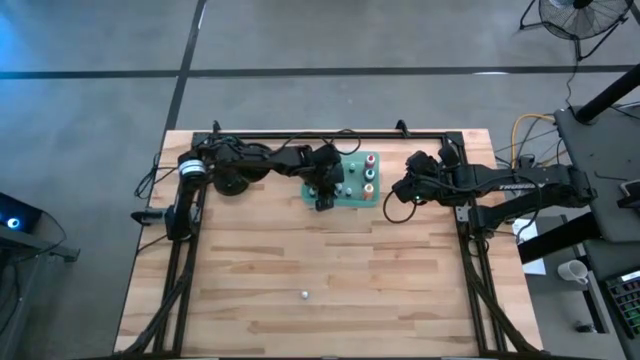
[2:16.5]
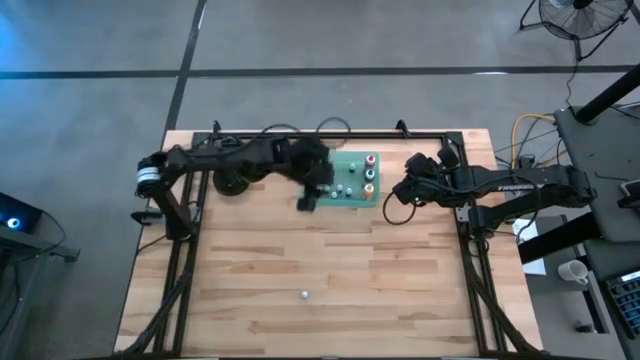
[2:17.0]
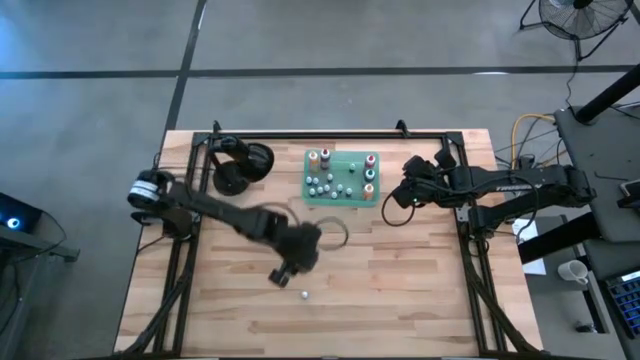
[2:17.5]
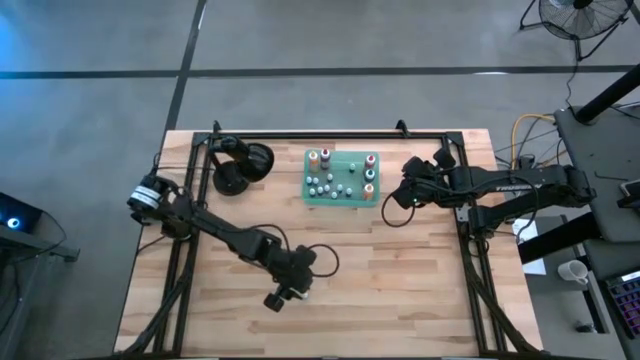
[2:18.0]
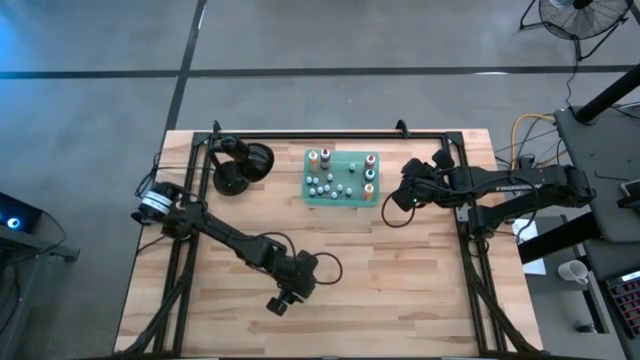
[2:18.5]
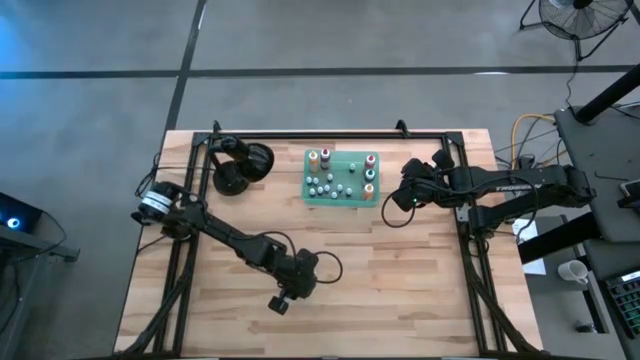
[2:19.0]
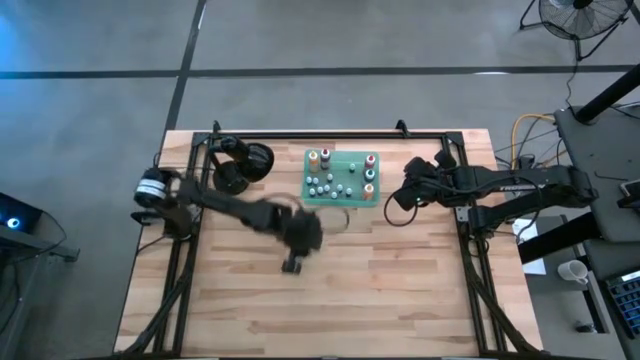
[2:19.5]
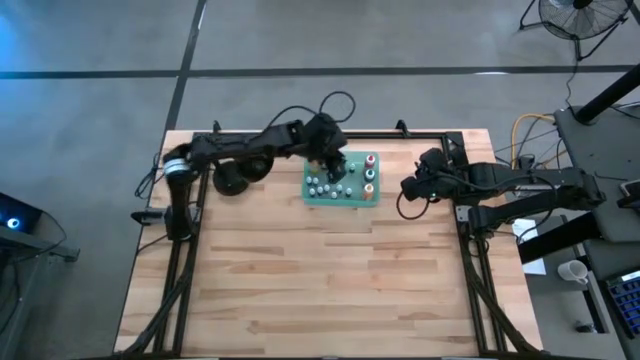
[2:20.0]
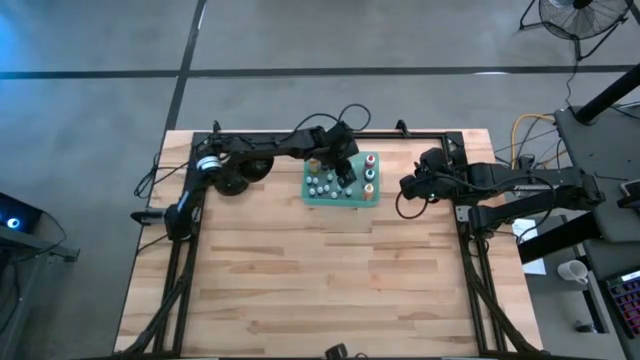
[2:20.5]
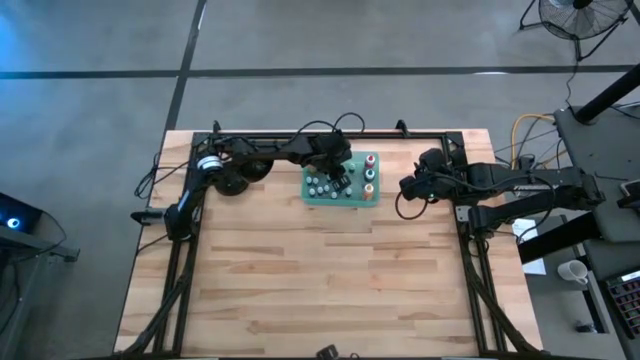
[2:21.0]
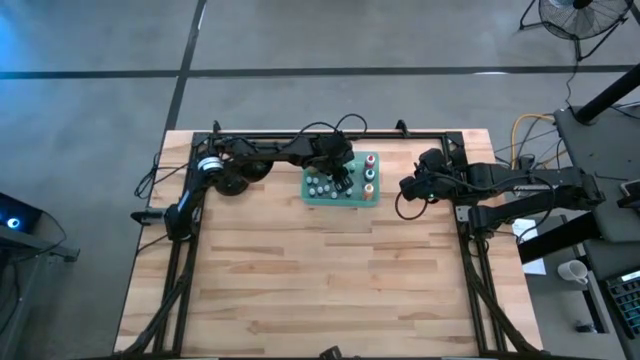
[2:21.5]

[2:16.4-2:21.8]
Task: Pick & Place food coloring
Put the small green food coloring bottle into the green bin

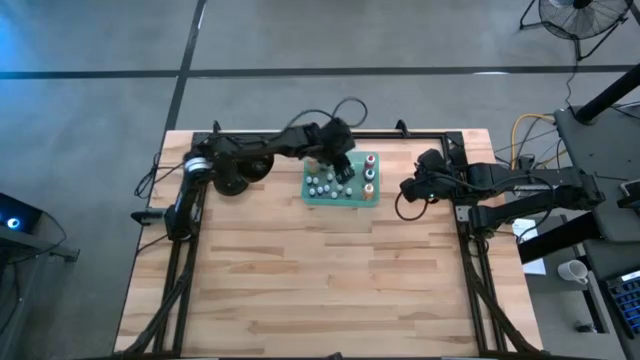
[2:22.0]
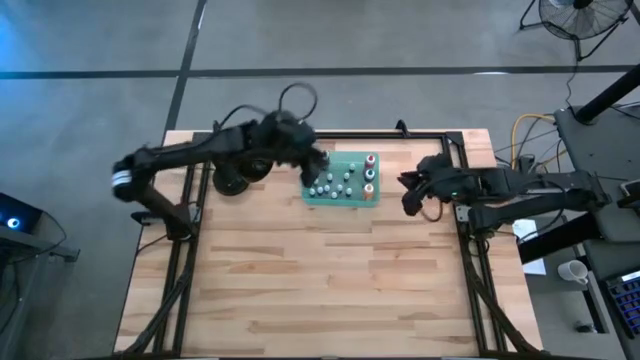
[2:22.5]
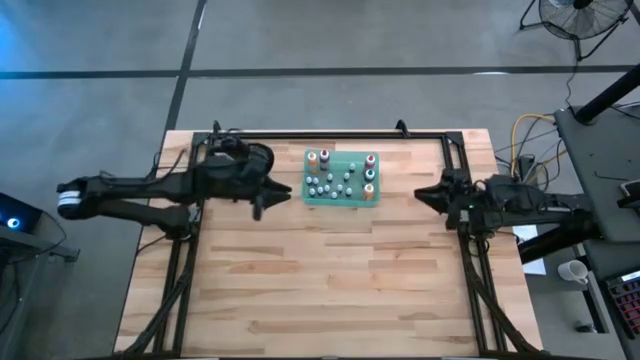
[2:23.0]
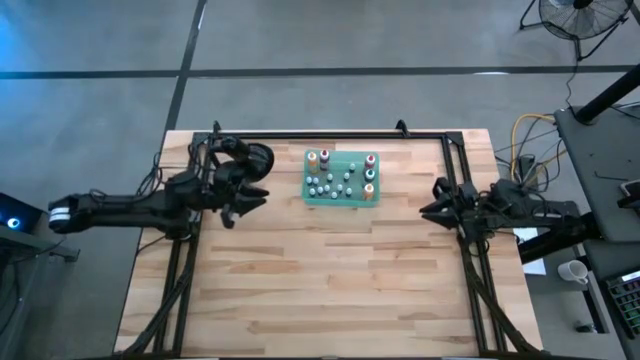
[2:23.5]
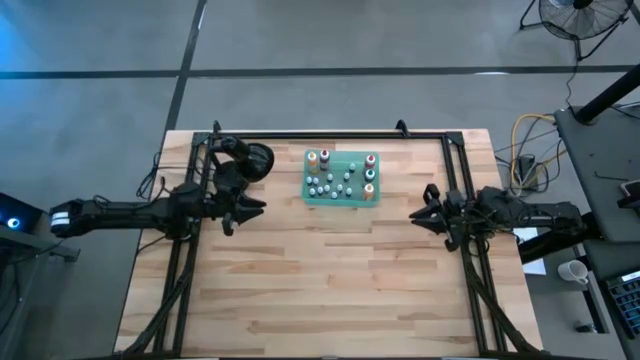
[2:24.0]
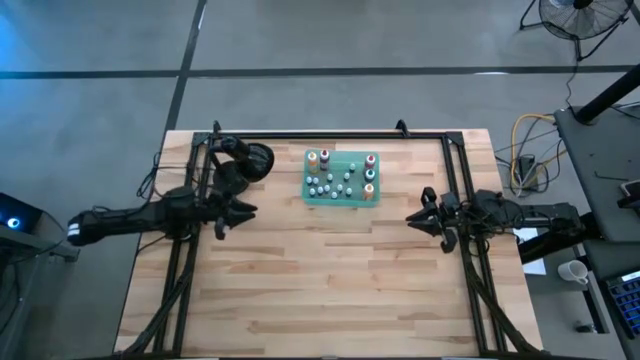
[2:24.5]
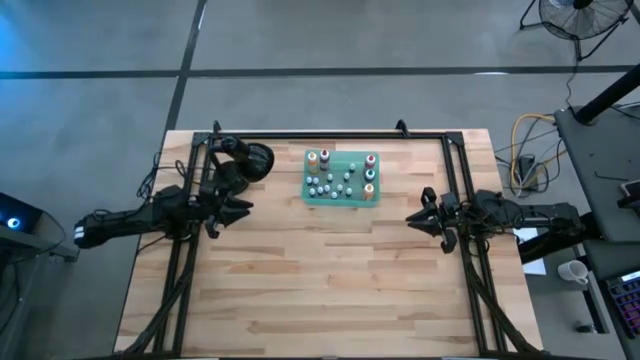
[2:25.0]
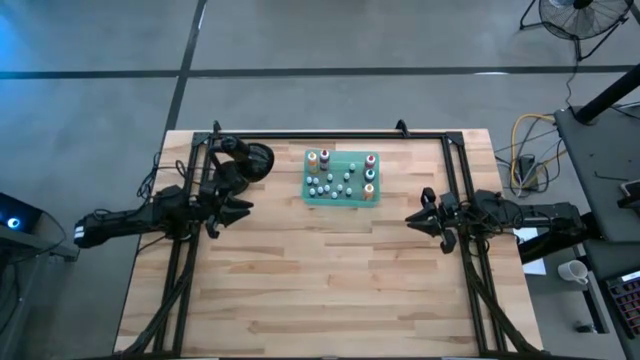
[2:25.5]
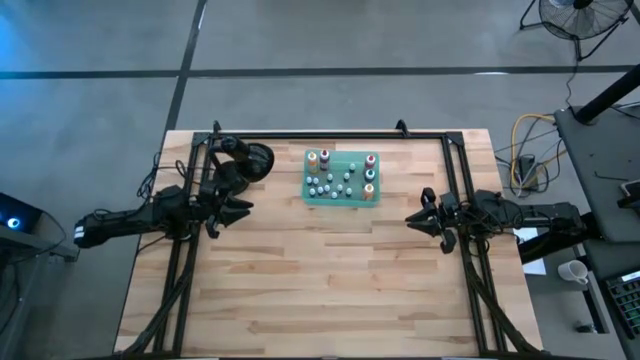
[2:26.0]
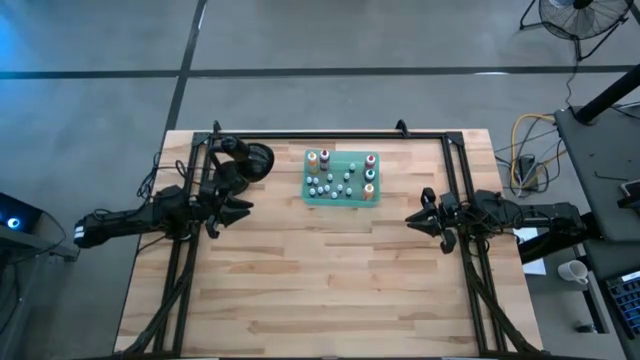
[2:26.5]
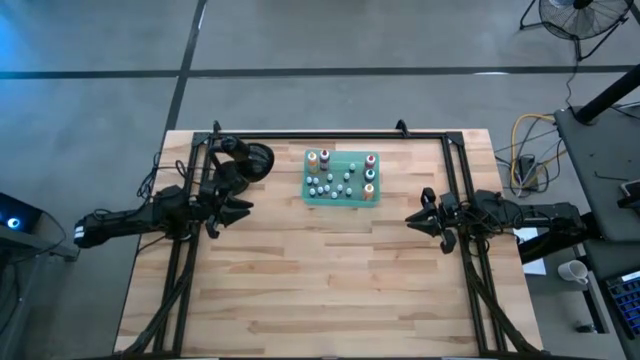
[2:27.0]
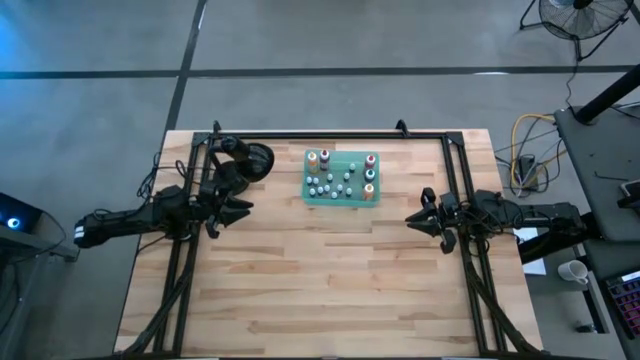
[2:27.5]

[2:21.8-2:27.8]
Return to Home Position

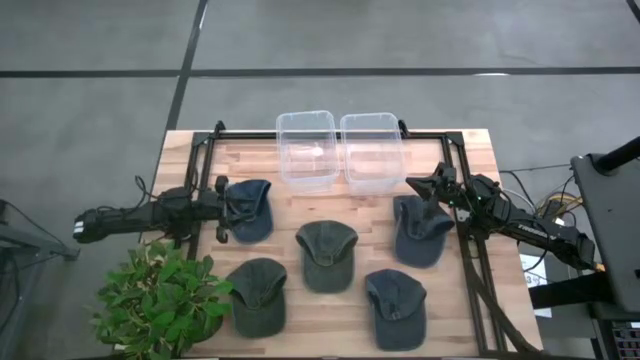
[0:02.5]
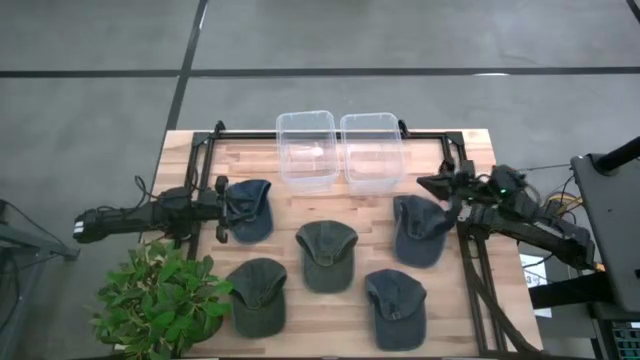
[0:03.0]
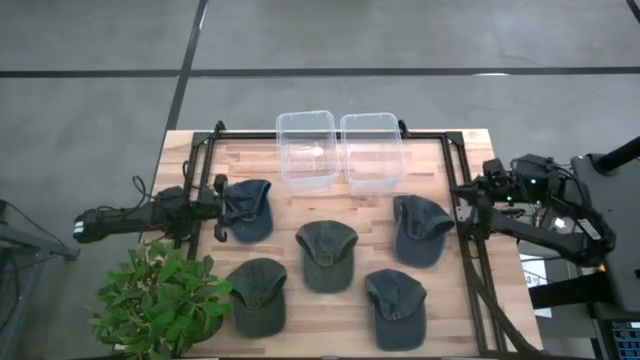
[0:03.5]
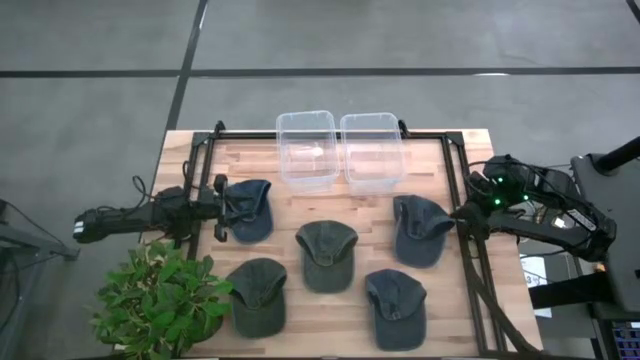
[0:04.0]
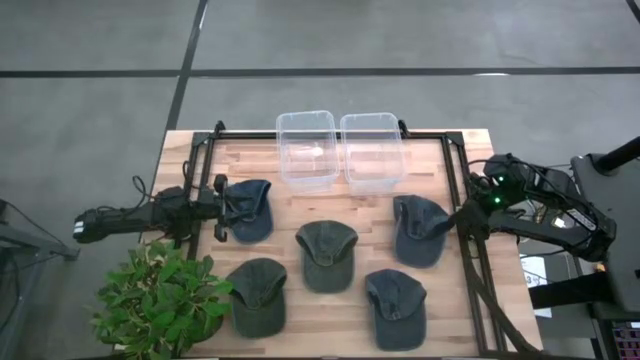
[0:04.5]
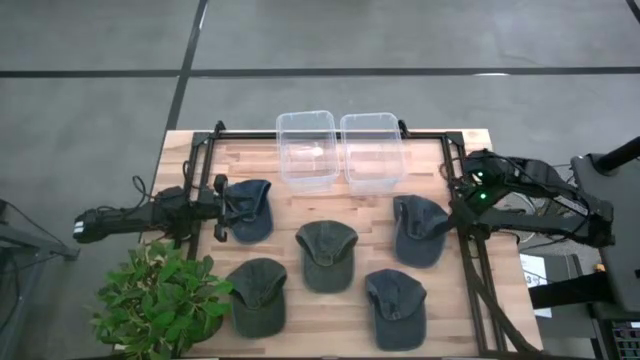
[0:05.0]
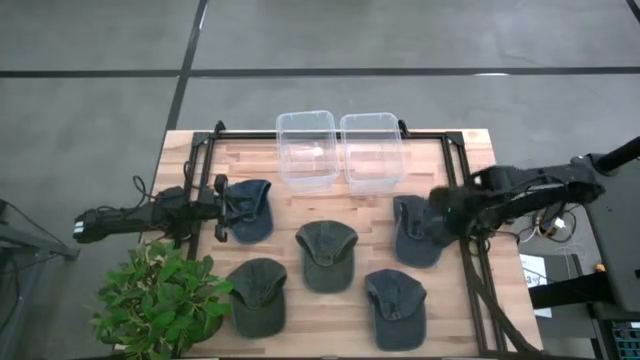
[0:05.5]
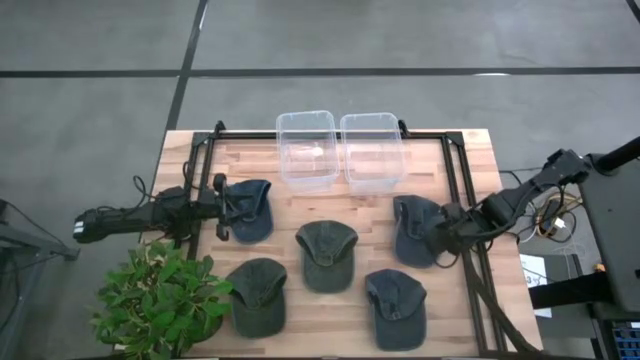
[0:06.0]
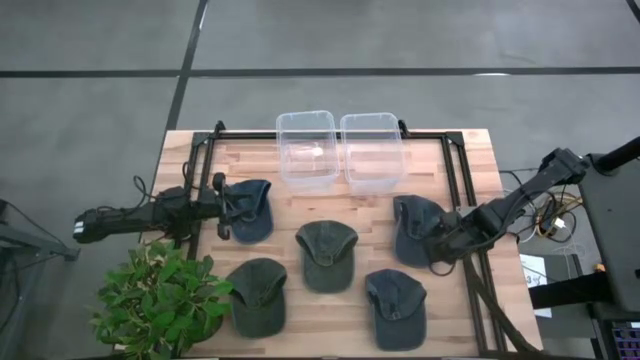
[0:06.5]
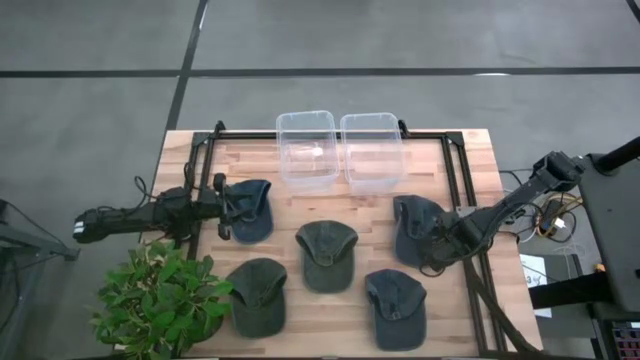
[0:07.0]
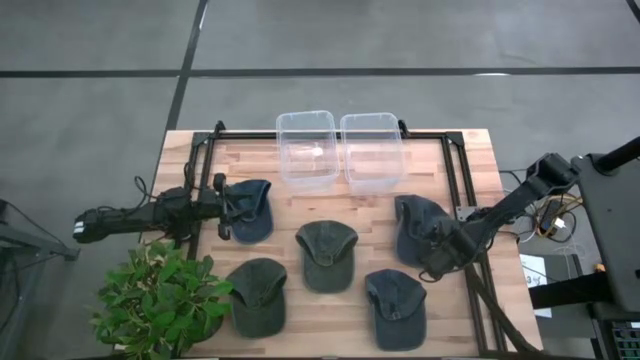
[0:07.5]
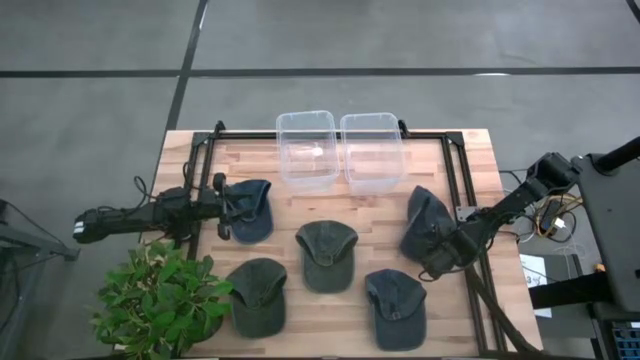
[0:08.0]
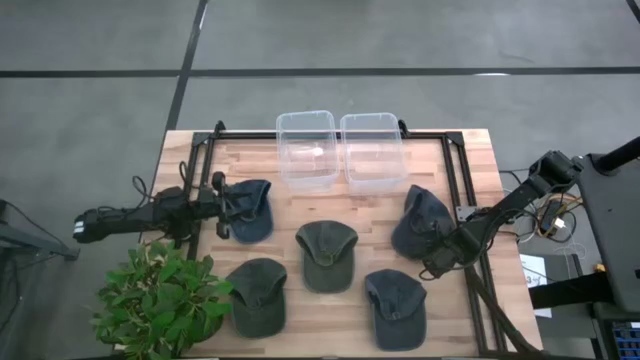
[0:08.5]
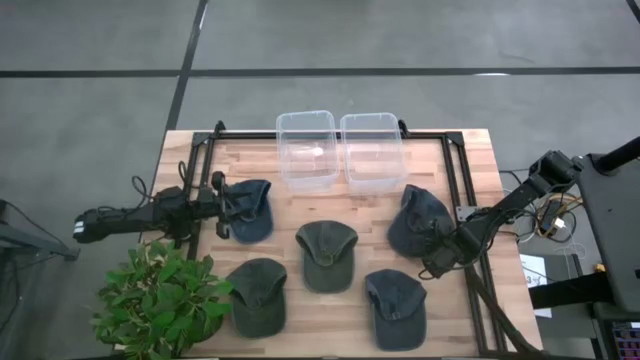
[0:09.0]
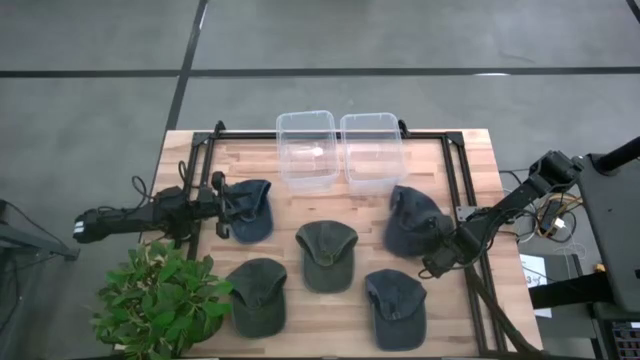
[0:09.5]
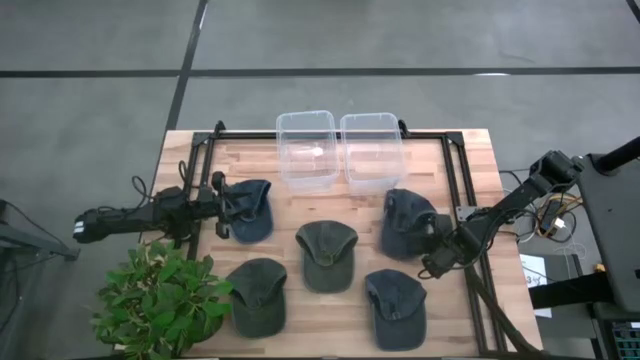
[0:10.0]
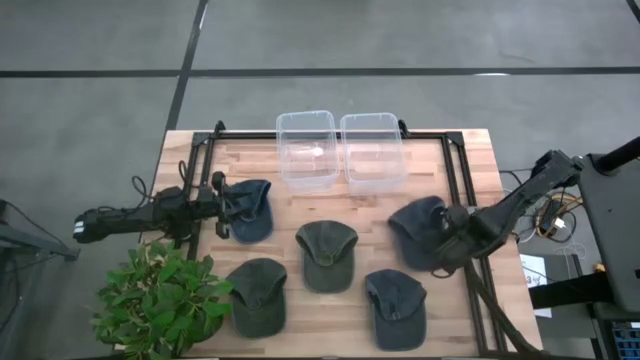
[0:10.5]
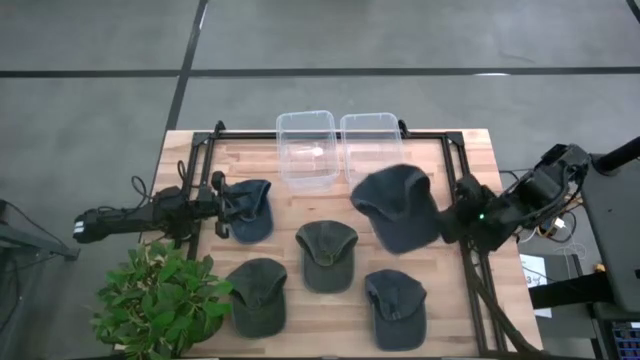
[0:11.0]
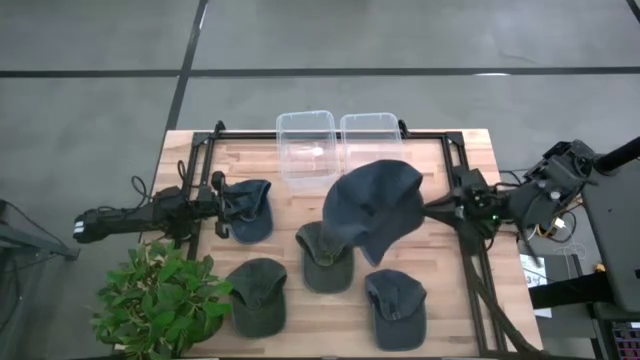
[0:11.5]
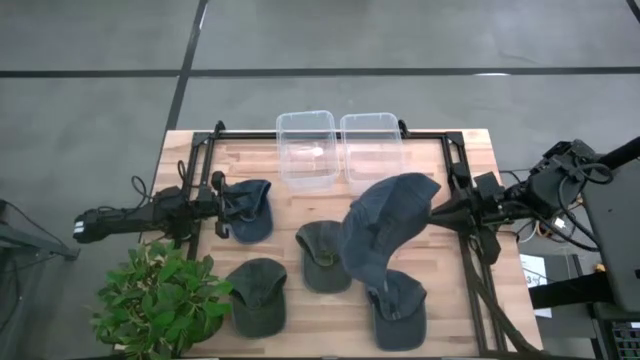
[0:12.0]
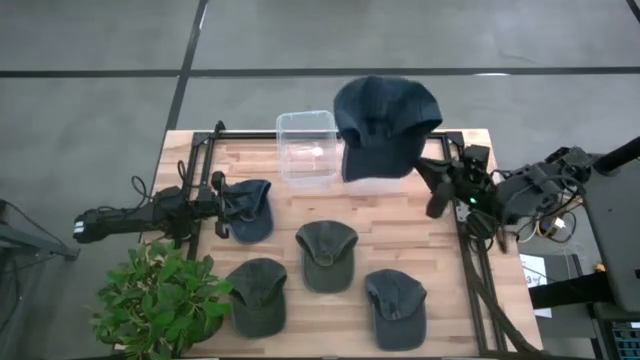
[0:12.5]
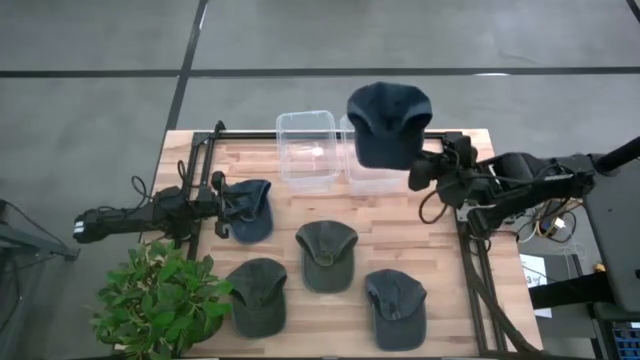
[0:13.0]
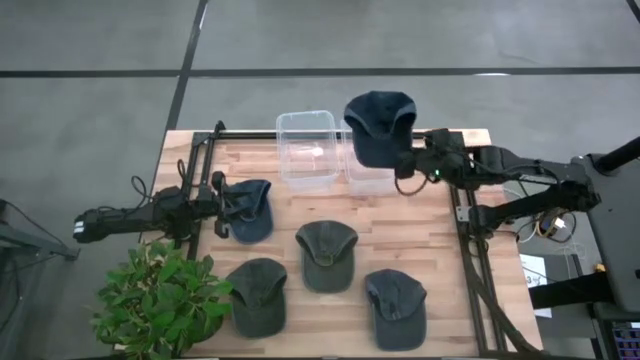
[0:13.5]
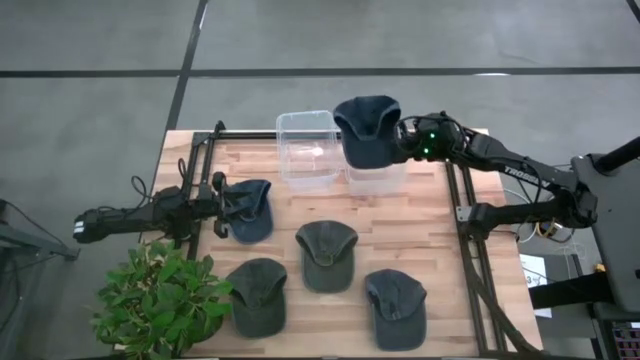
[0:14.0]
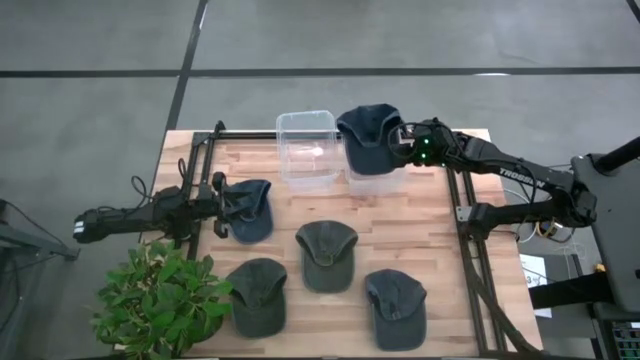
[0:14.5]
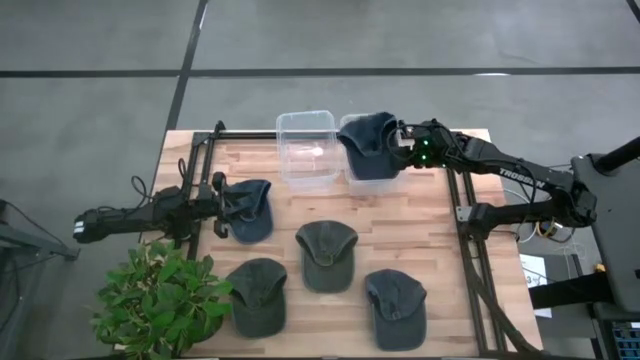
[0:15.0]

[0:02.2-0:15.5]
Task: Pick & Place hat
Put the top right blue cap into the right transparent bin
